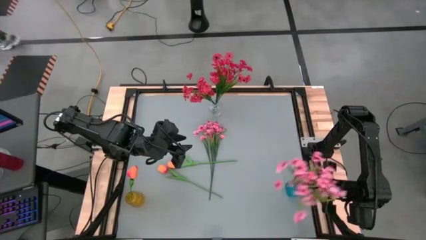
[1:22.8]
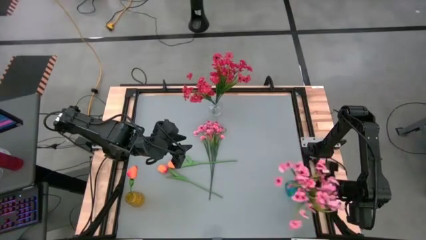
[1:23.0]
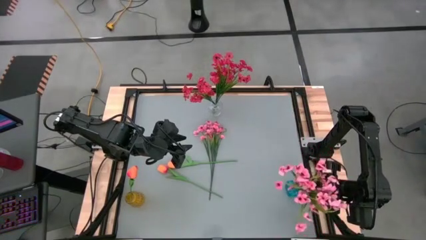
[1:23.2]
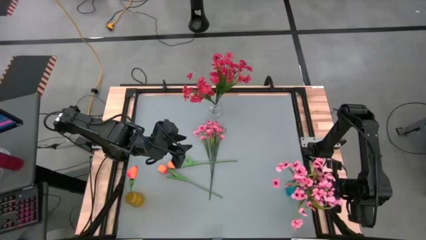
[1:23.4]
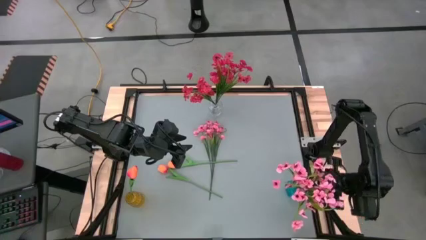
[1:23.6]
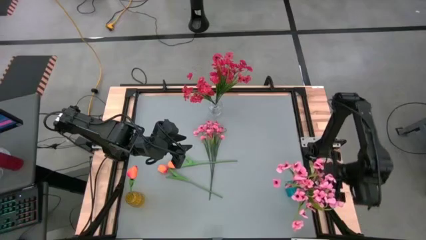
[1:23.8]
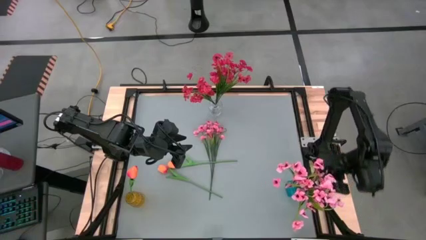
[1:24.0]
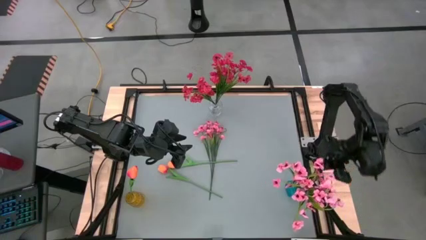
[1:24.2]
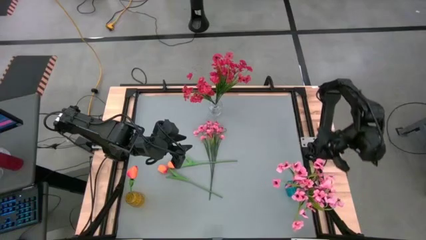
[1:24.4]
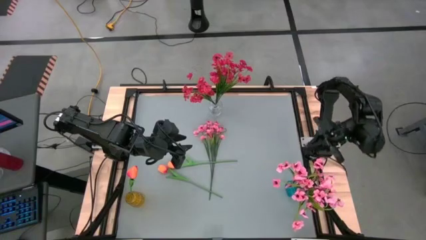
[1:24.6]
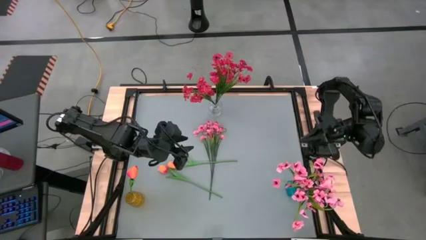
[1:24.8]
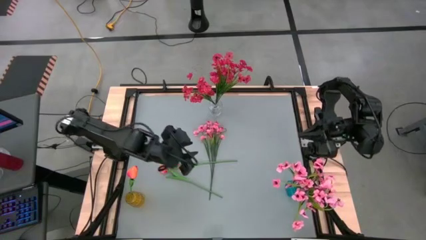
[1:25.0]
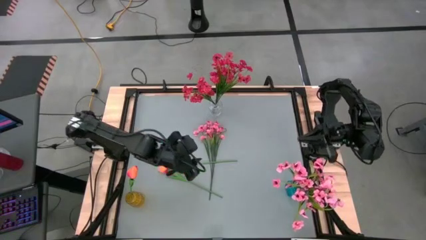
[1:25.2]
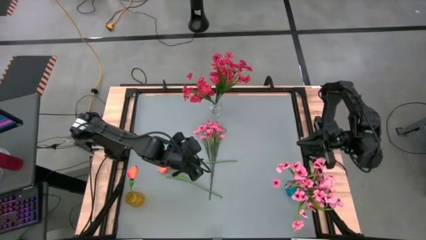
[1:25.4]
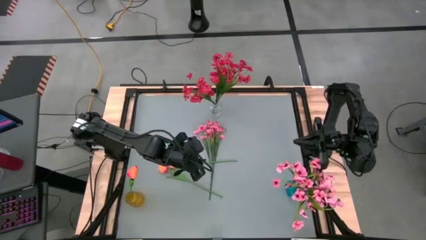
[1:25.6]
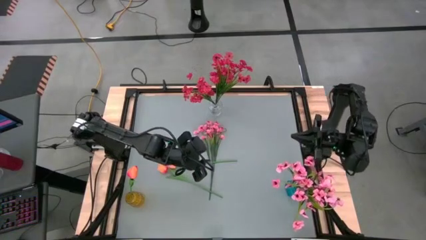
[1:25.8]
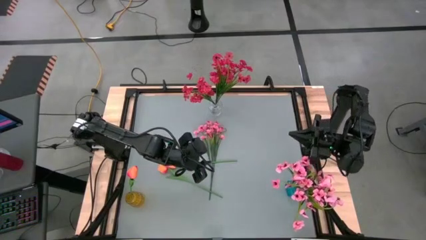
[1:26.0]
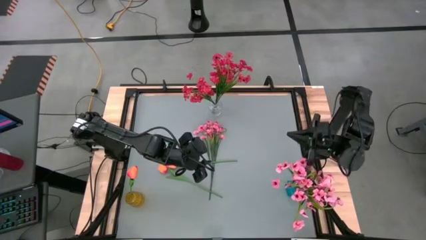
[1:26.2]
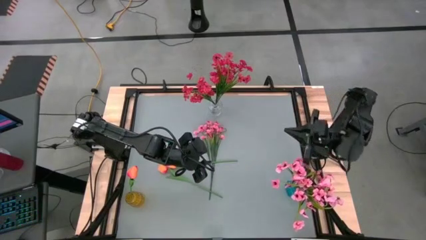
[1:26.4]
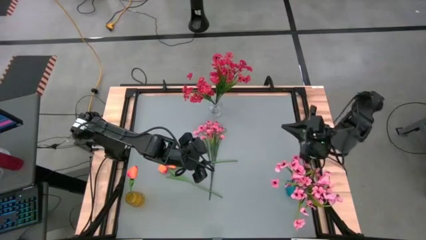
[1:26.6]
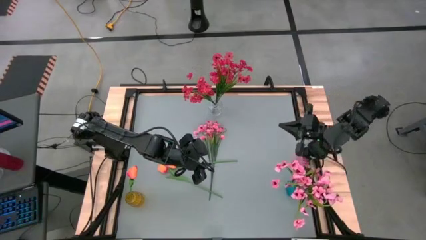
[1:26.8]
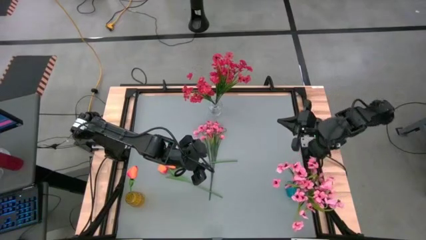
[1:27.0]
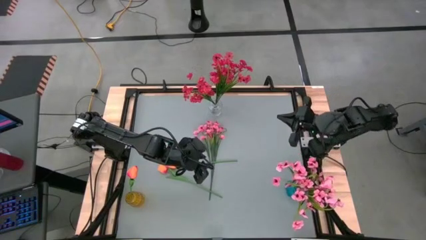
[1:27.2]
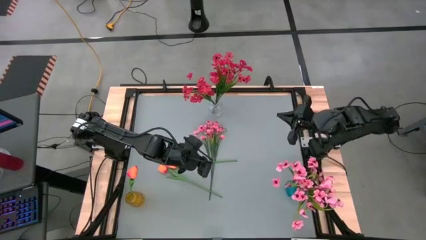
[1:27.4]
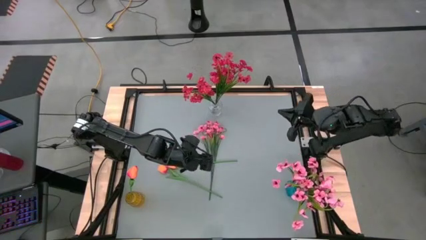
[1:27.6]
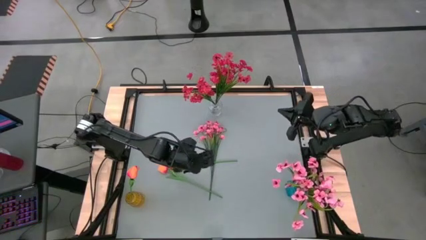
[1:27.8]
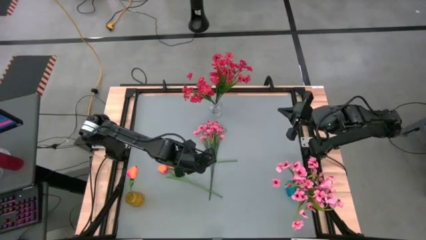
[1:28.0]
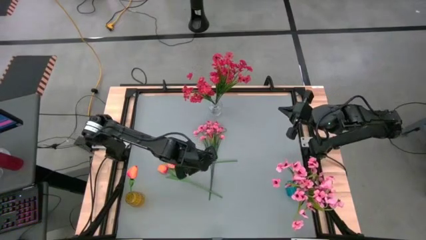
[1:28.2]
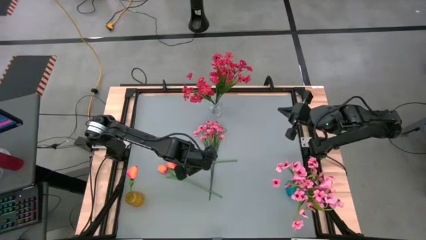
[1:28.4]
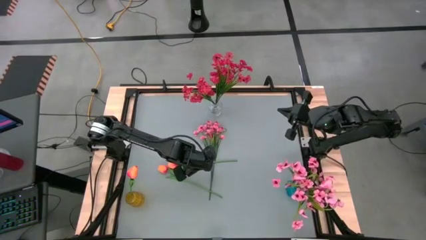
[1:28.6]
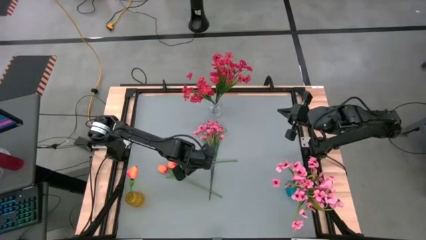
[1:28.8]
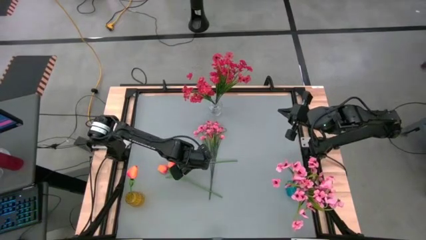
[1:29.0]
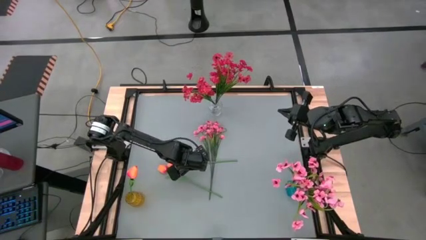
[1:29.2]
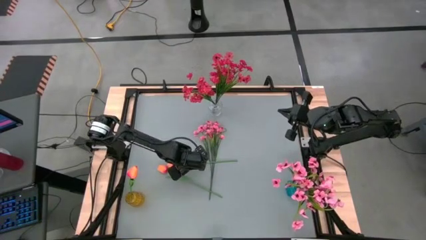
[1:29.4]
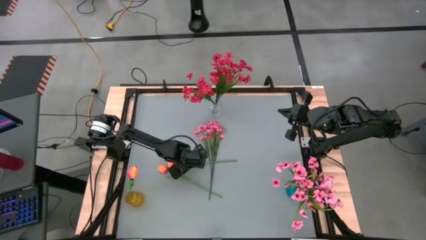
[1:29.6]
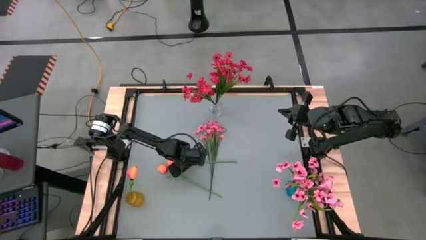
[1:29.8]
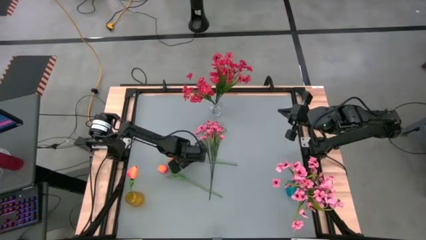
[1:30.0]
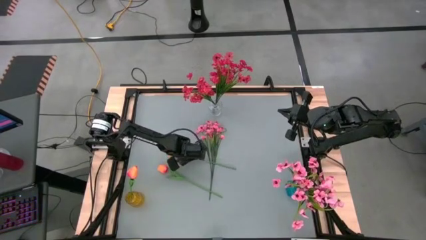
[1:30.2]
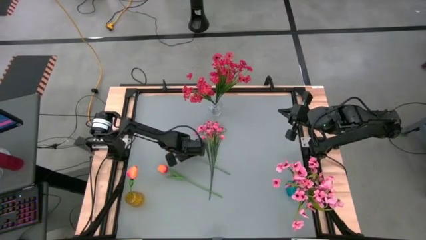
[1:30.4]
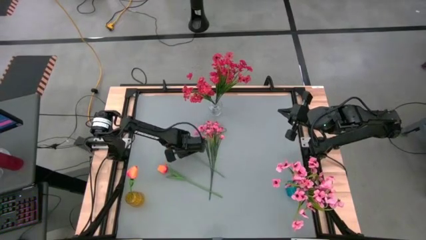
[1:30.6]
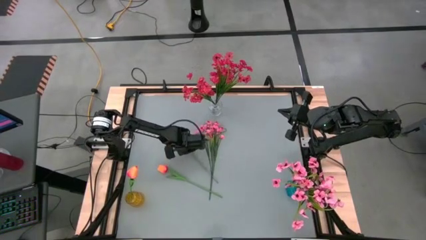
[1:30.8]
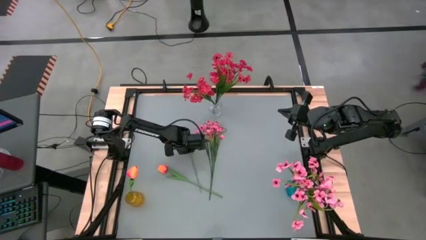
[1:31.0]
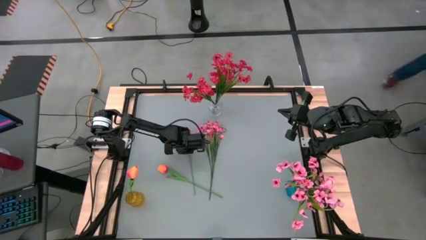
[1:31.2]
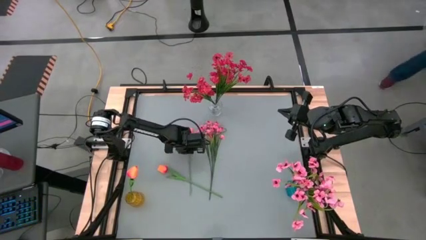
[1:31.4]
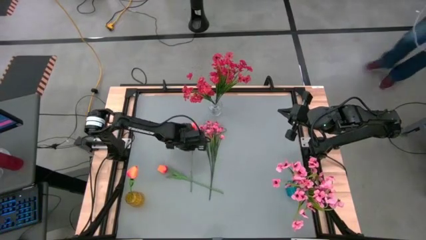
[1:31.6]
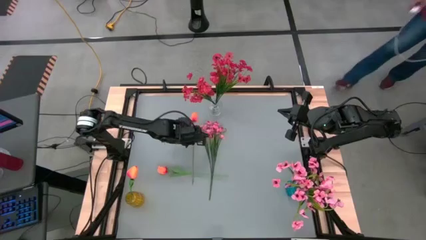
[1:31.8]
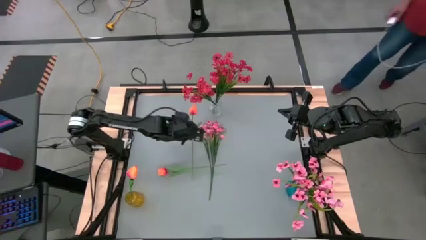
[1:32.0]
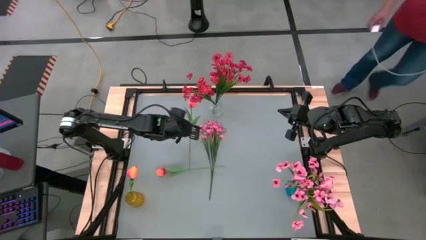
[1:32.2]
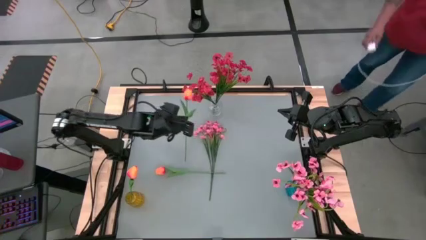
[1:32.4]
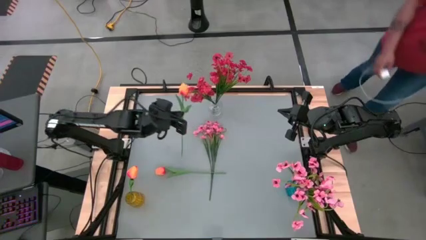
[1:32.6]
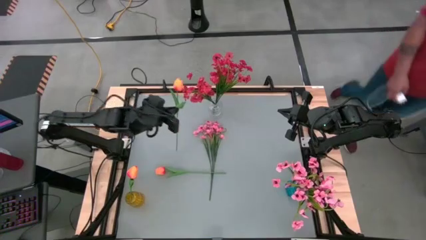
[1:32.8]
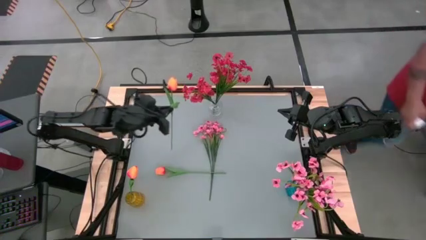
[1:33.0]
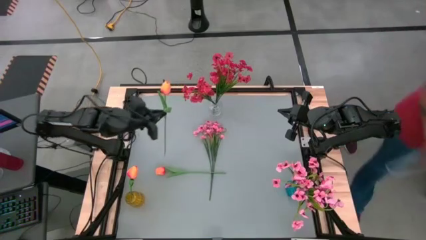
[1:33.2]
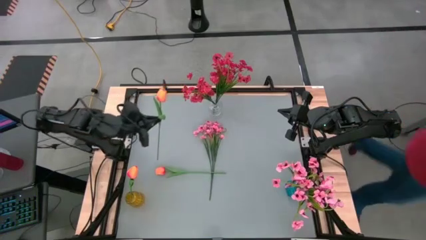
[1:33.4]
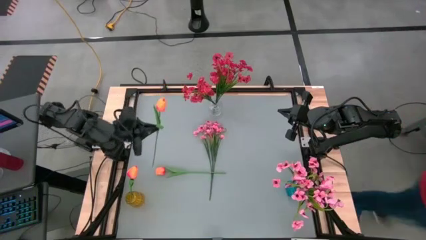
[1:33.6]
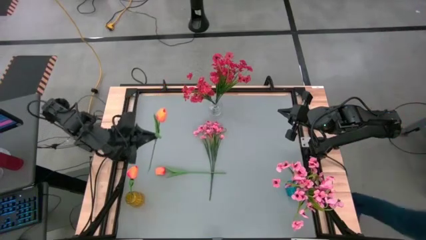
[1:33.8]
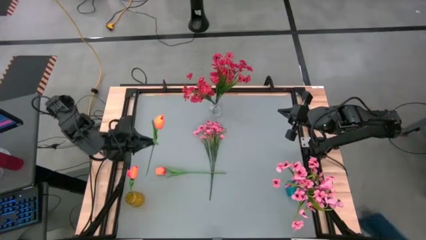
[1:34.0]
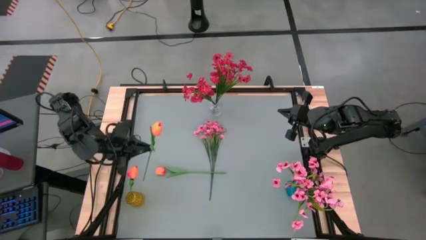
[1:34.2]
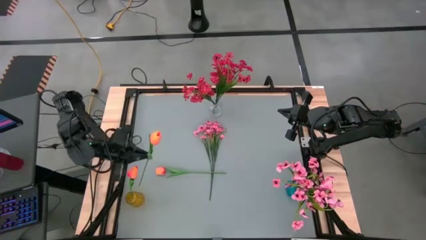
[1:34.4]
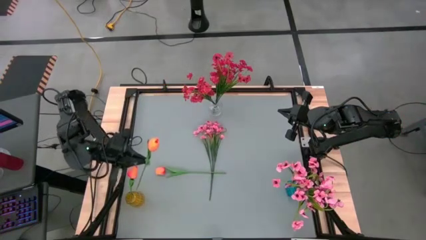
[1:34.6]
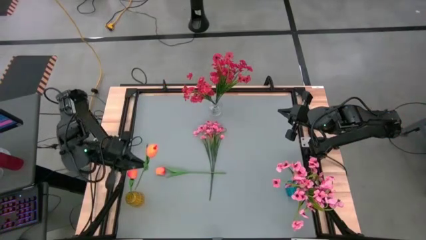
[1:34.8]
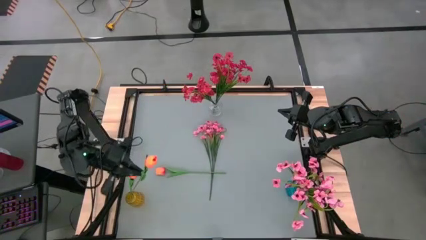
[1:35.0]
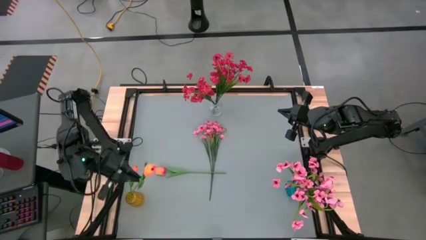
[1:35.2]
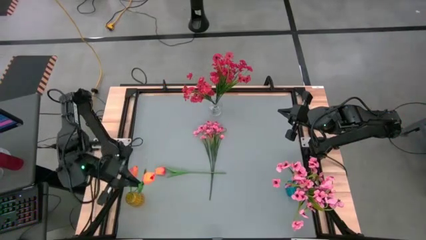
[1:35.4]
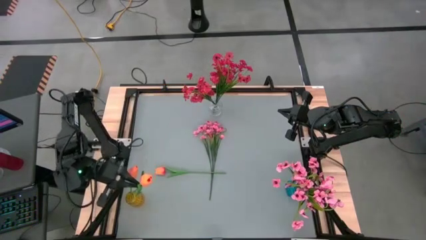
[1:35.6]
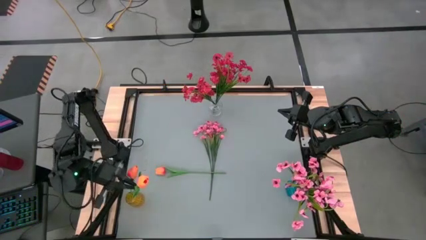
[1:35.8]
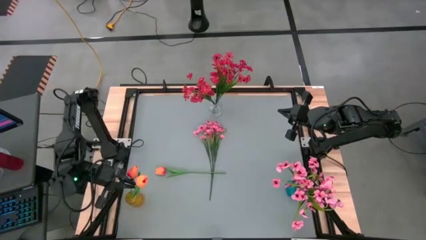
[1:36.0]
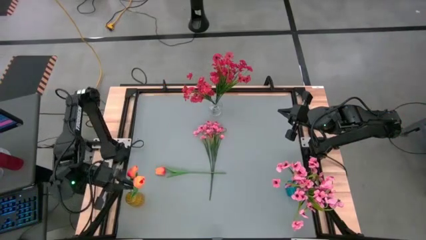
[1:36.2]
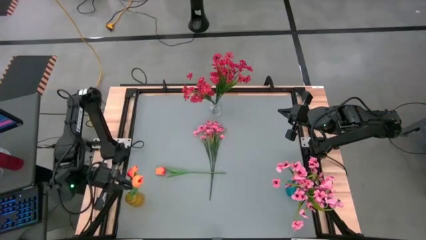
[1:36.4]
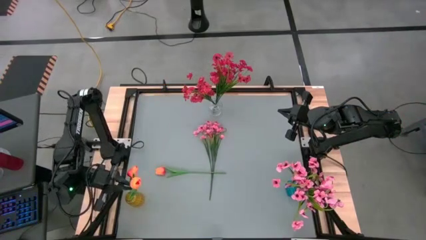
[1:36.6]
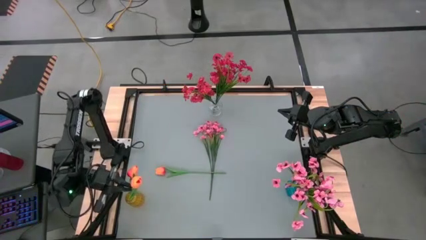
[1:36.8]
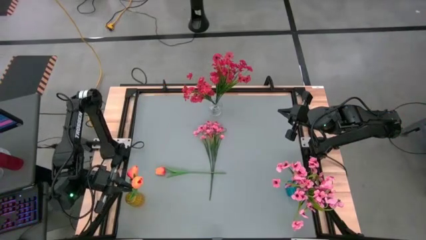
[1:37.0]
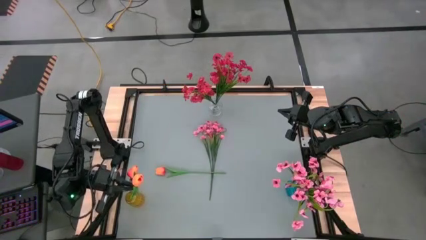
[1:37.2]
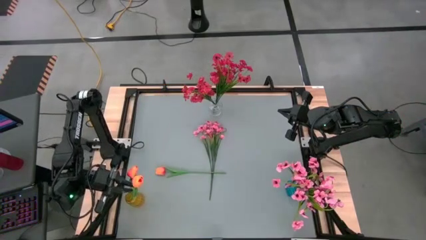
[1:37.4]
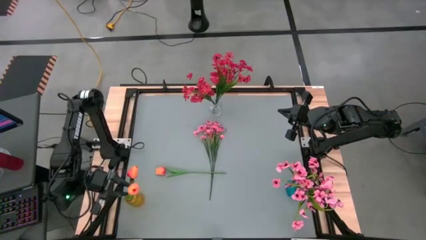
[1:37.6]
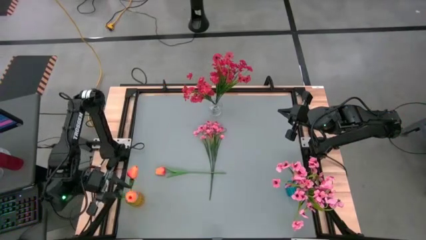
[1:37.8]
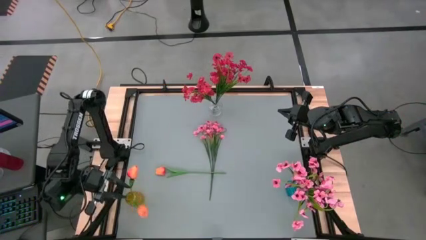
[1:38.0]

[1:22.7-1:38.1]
Task: Sort flowers into vase by color
Put the top orange tulip flower into the yellow vase
